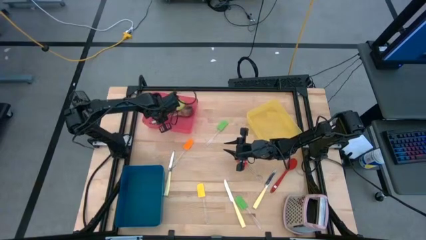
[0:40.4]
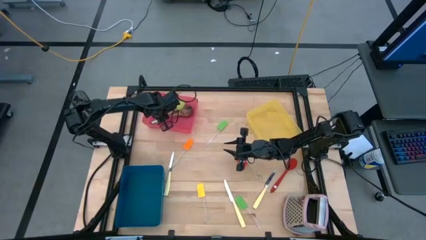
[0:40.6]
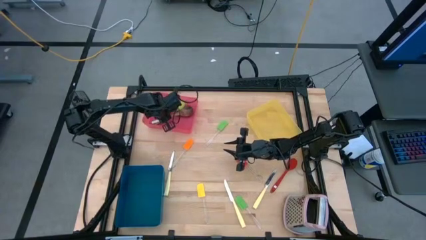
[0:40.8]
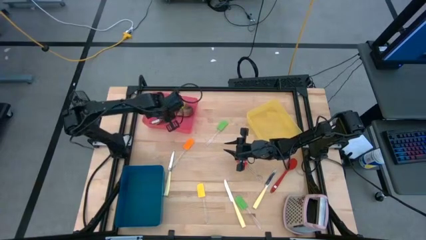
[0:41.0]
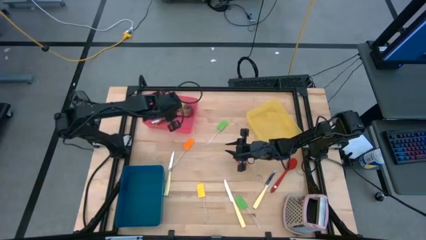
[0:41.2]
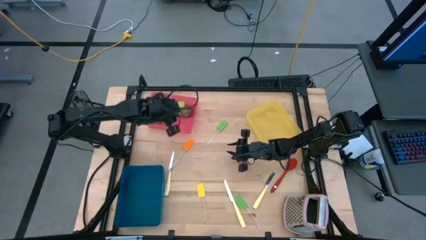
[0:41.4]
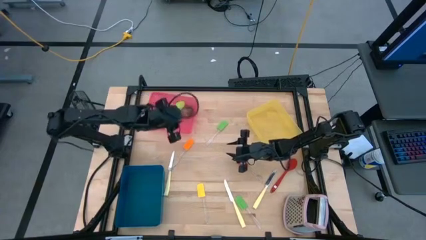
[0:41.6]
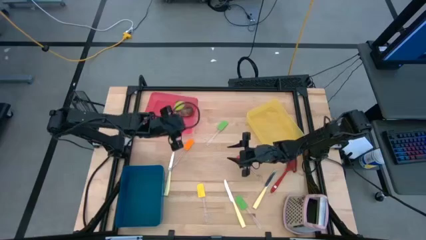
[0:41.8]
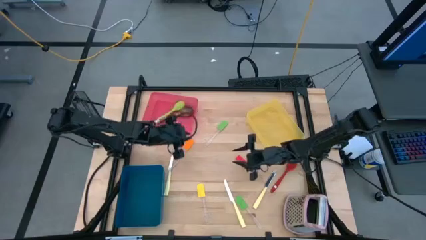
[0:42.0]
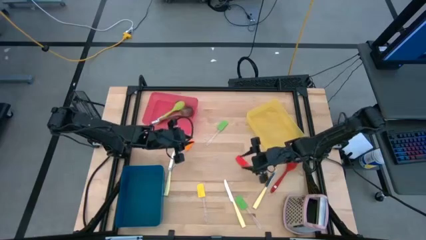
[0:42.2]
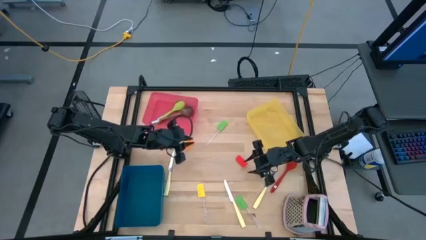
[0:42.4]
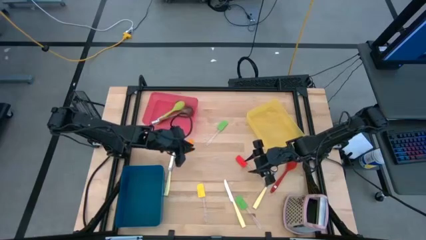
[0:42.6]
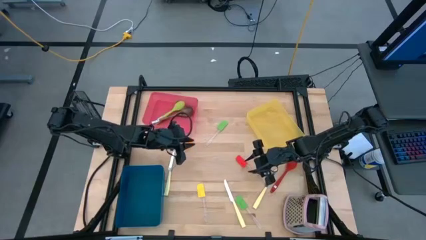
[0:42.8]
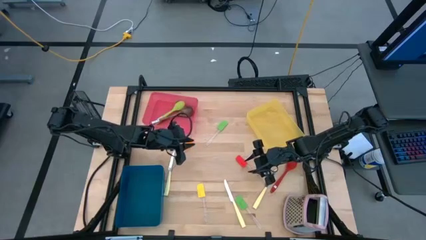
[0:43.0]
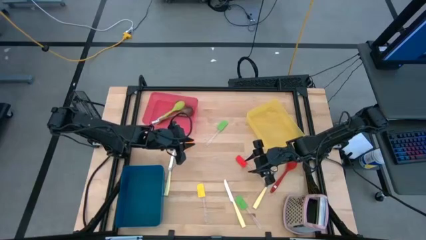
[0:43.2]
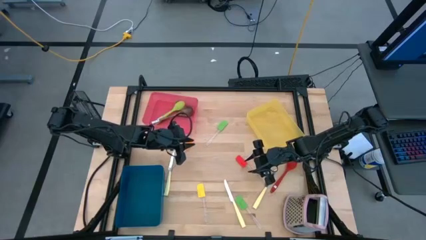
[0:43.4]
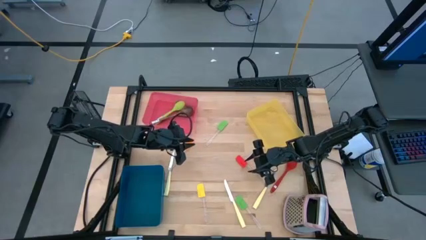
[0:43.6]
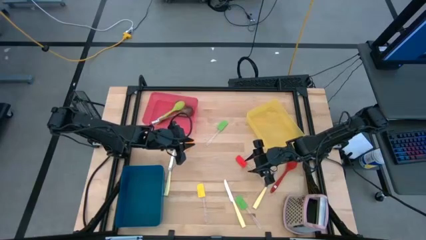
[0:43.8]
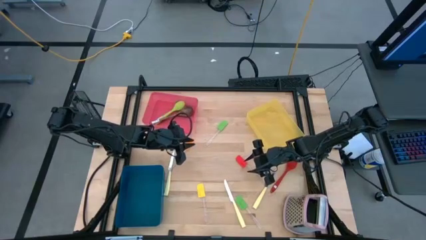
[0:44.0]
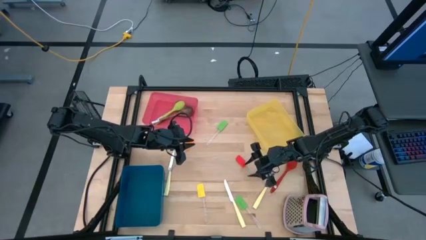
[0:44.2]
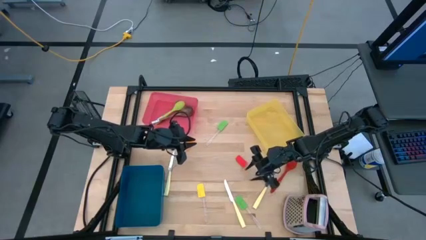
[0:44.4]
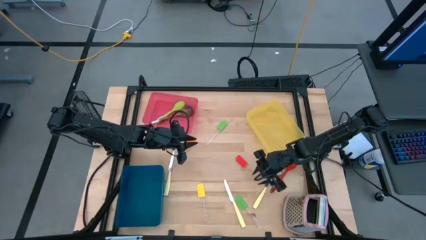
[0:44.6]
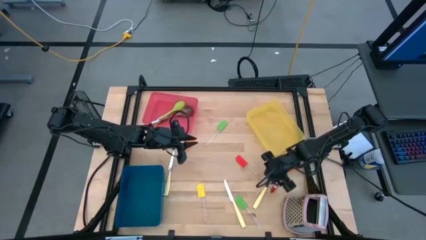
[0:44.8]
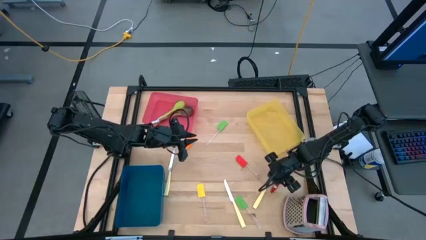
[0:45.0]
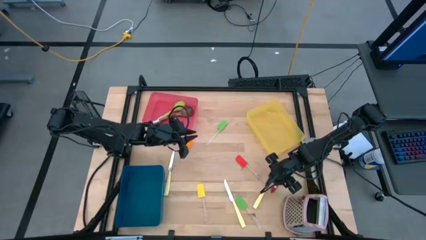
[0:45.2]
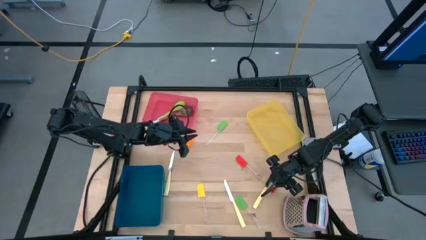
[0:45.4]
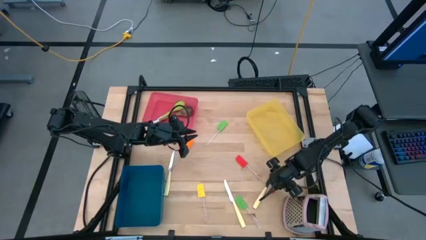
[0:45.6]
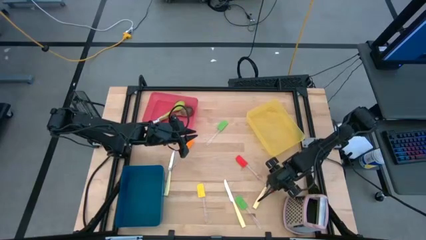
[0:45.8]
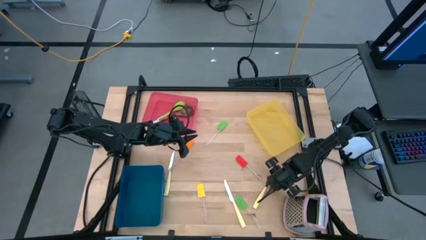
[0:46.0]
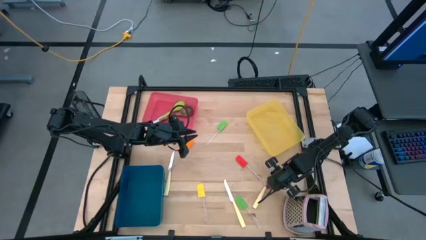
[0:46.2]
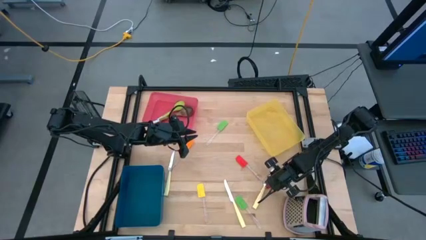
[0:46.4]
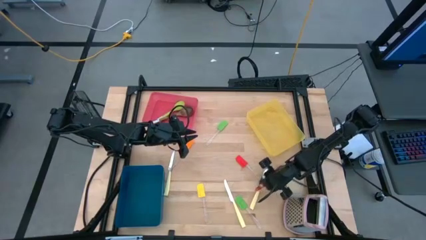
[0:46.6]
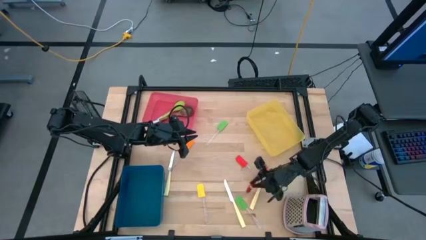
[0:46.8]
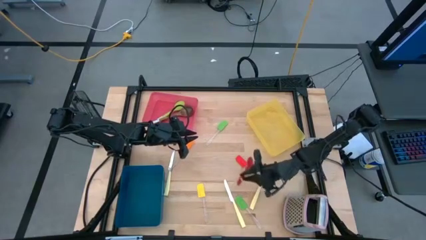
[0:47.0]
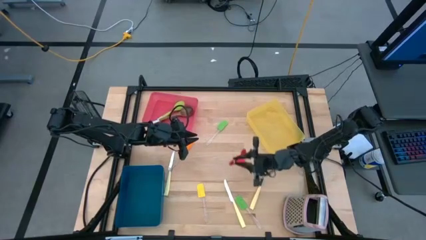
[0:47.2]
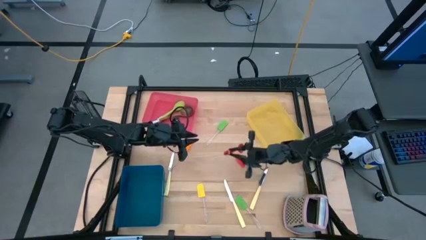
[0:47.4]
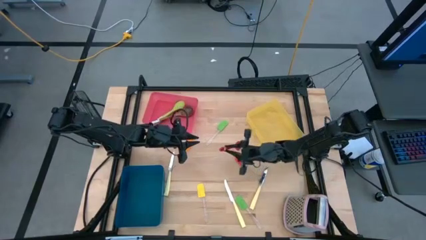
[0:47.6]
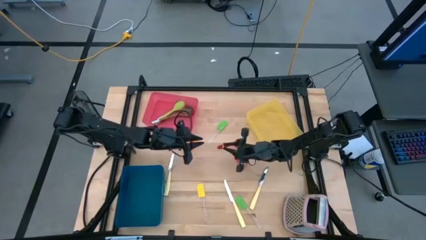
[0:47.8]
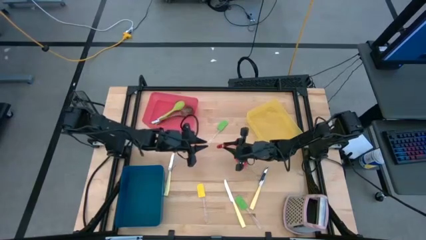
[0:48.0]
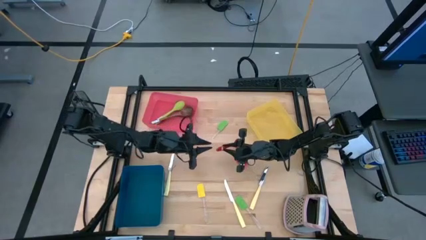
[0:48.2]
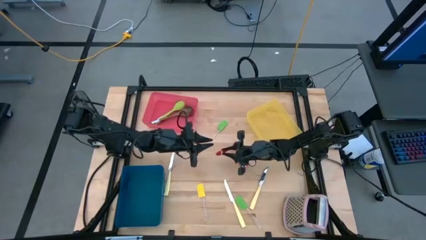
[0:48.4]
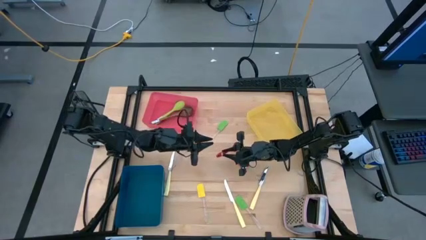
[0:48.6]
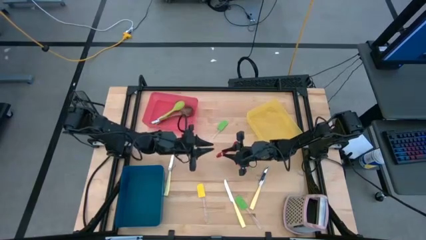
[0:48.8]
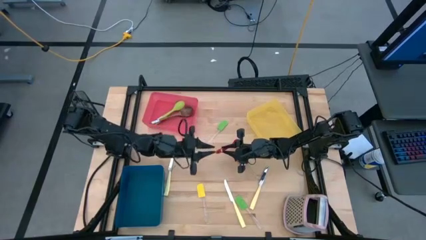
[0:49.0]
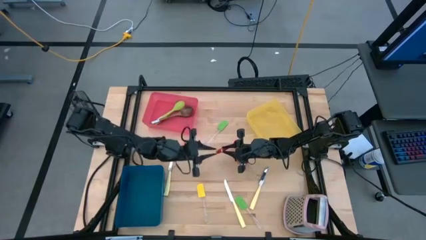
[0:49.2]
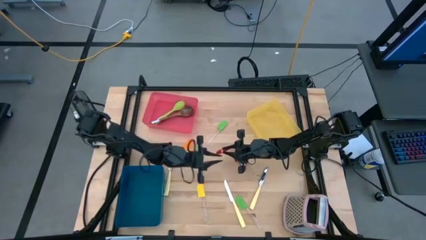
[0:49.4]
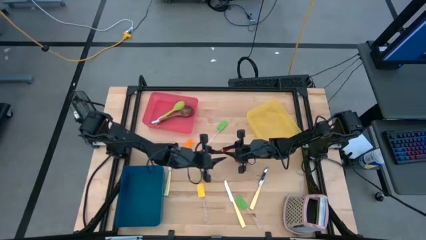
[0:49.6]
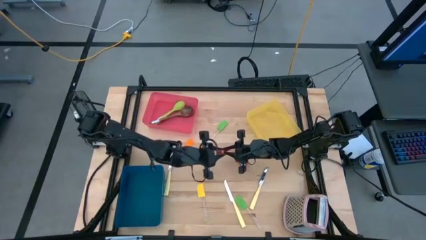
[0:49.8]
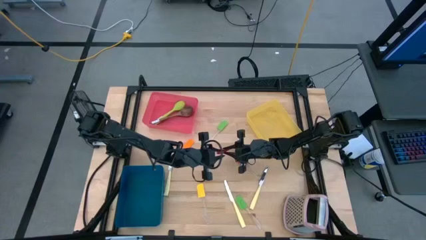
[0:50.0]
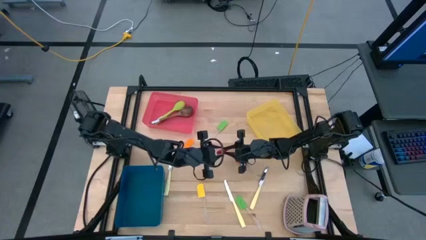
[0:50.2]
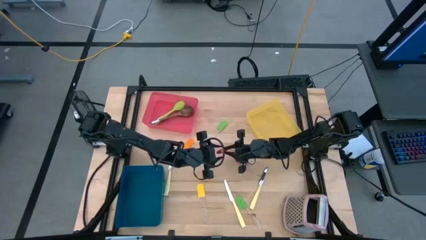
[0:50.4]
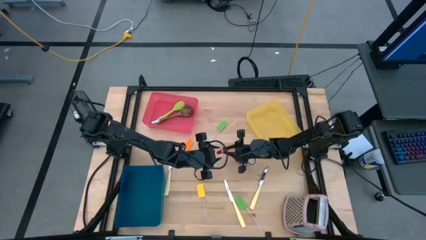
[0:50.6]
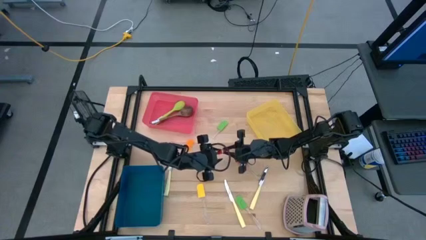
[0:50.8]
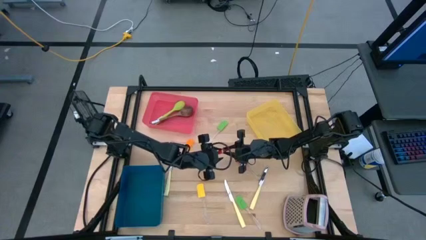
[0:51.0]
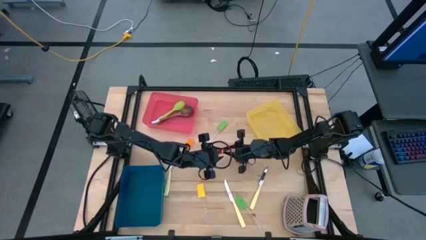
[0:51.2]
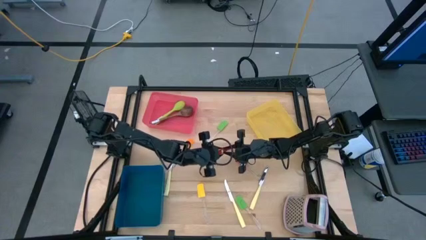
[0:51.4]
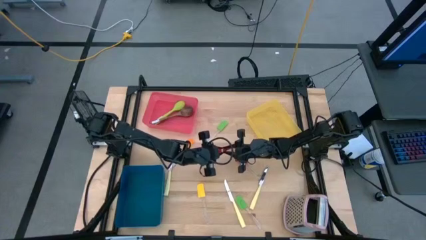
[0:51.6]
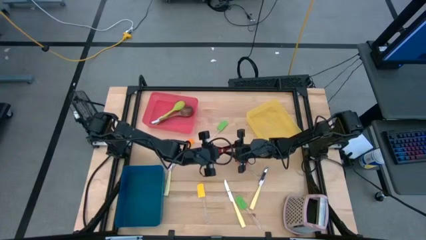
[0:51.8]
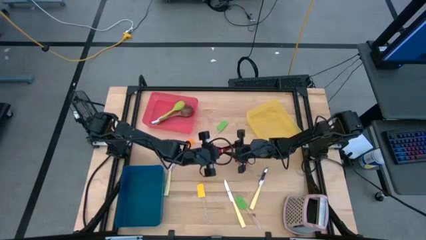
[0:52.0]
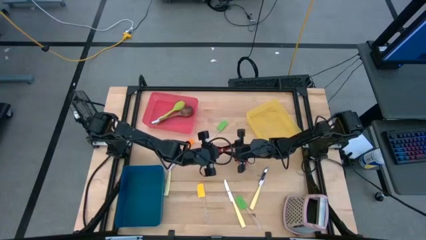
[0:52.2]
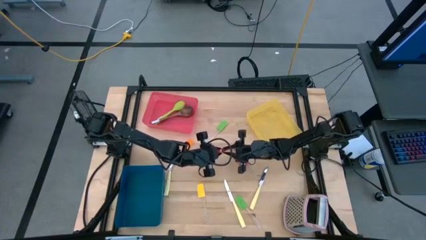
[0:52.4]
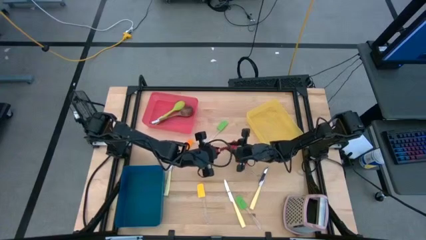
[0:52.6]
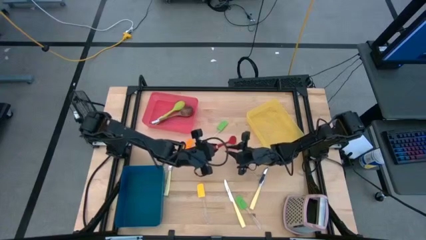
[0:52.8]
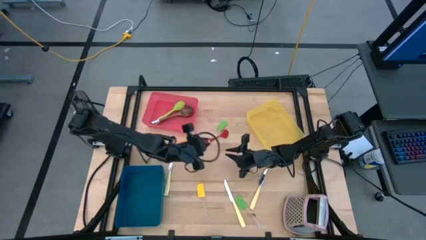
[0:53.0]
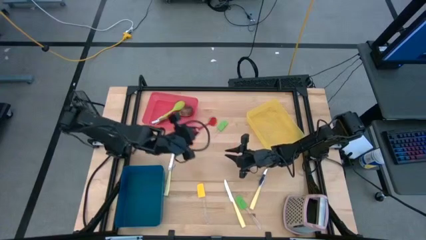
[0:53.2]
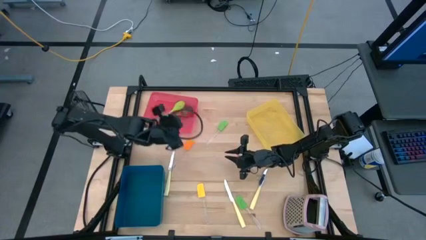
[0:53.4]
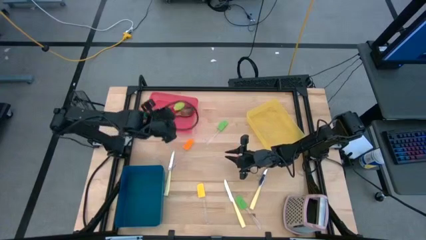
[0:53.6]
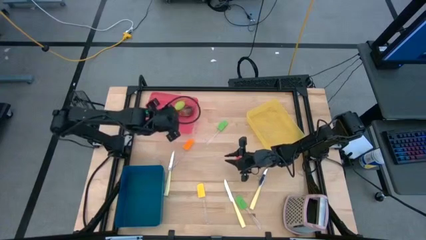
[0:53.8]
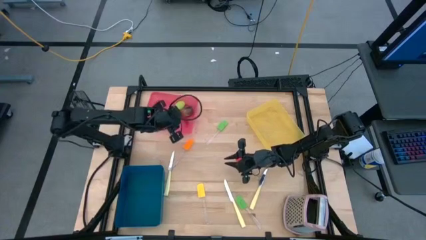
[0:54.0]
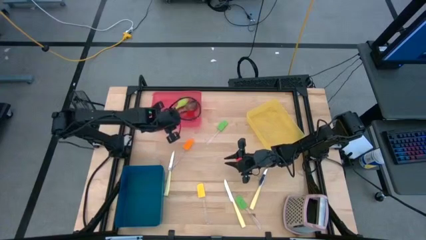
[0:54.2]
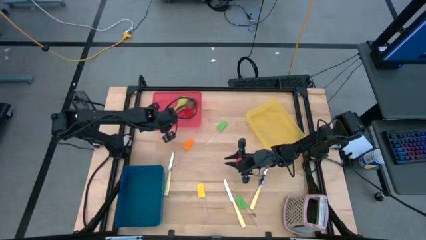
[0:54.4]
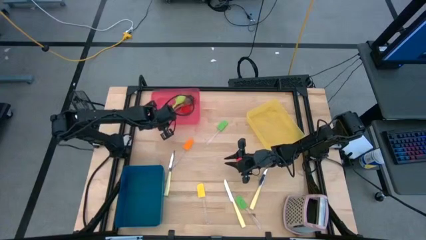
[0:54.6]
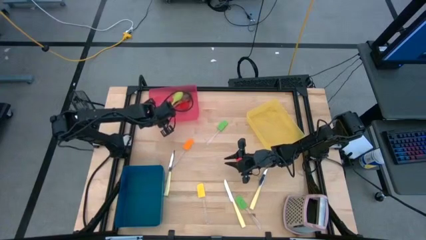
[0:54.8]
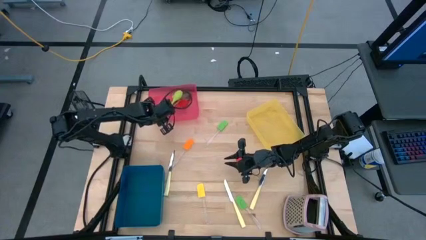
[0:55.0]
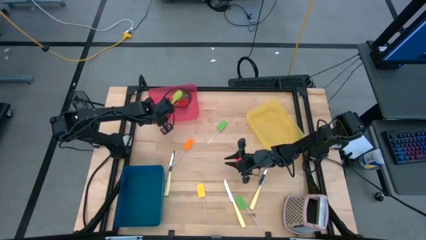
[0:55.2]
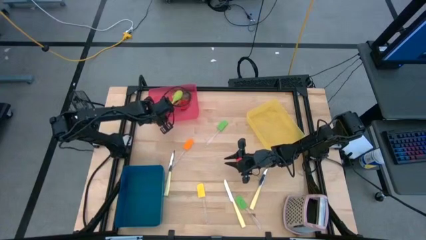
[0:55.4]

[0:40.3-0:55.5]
Task: Pick & Place Kitchen Items
Put the red serving spoon into the red bin
